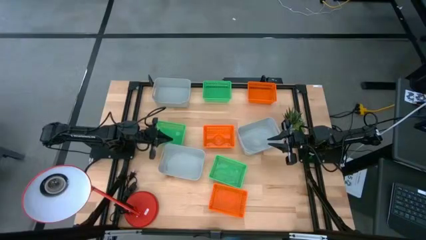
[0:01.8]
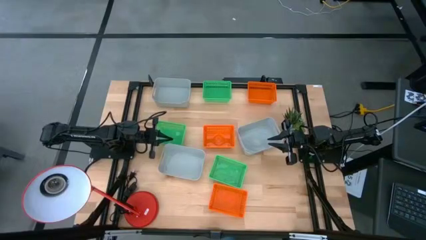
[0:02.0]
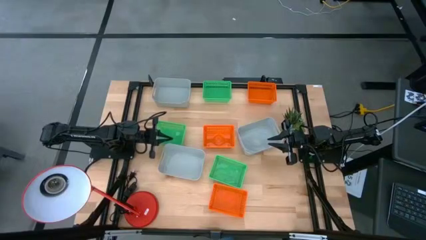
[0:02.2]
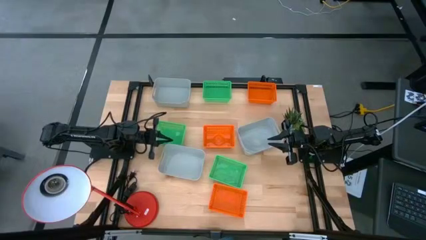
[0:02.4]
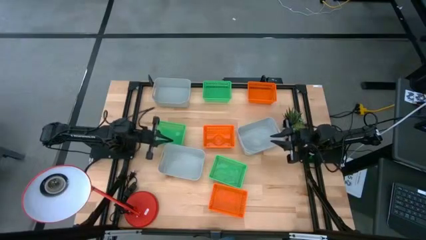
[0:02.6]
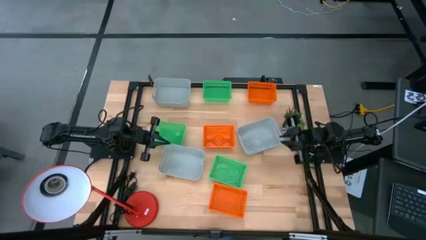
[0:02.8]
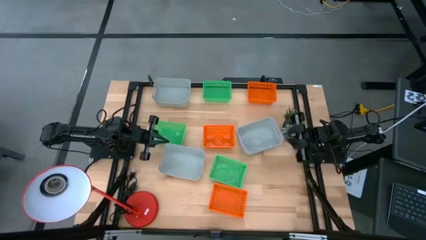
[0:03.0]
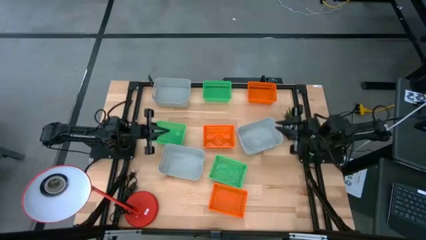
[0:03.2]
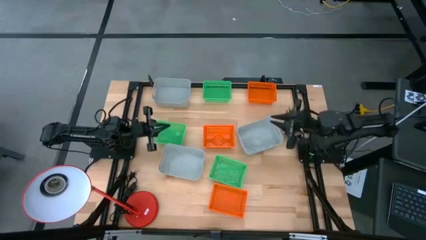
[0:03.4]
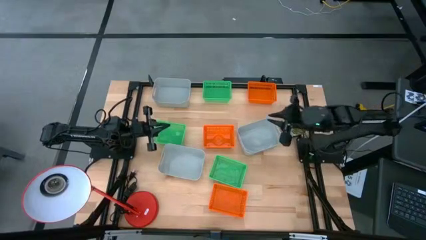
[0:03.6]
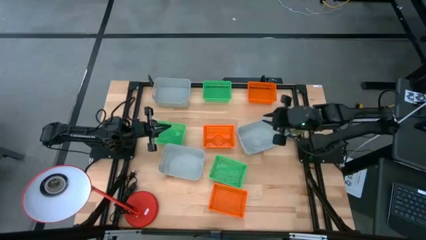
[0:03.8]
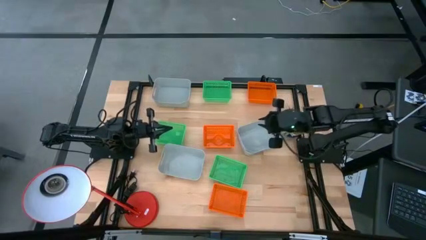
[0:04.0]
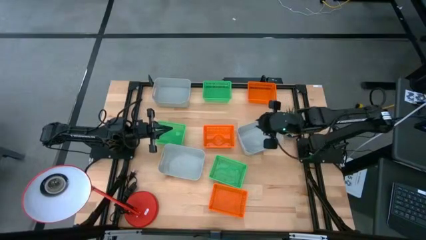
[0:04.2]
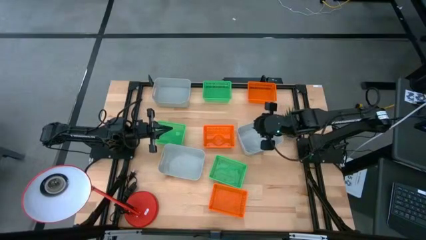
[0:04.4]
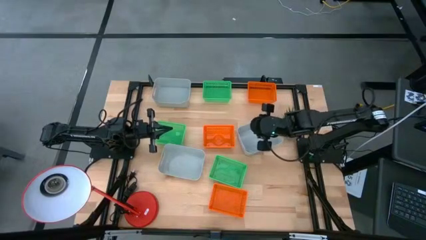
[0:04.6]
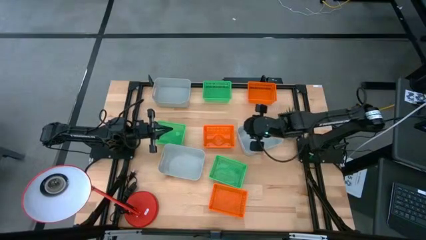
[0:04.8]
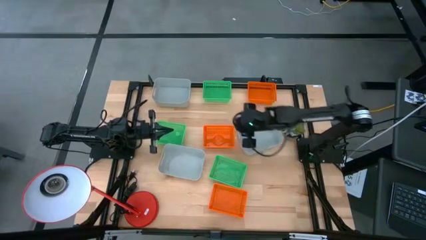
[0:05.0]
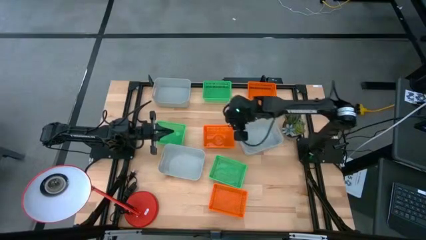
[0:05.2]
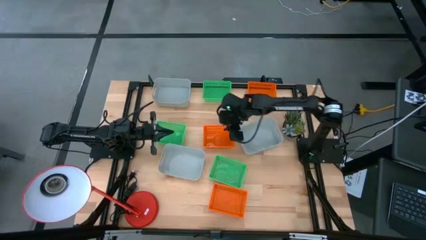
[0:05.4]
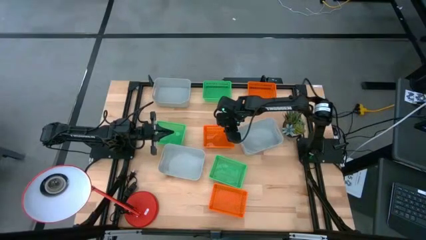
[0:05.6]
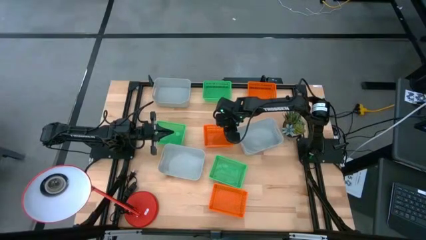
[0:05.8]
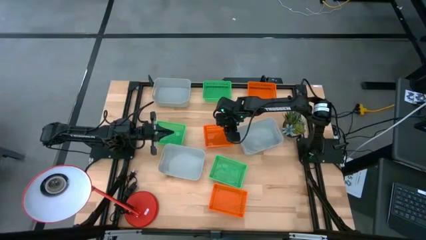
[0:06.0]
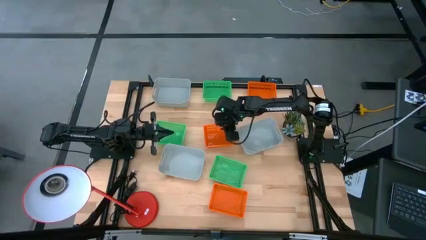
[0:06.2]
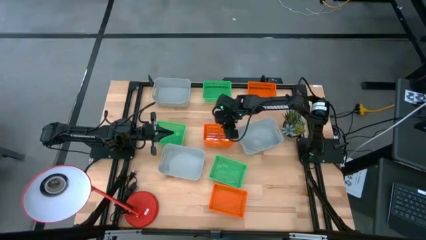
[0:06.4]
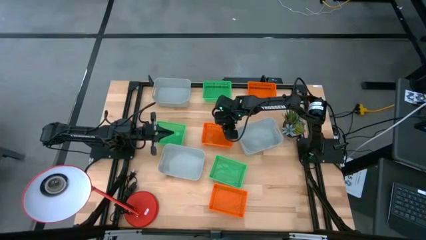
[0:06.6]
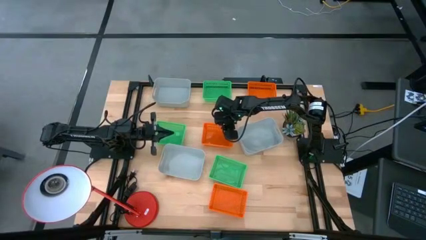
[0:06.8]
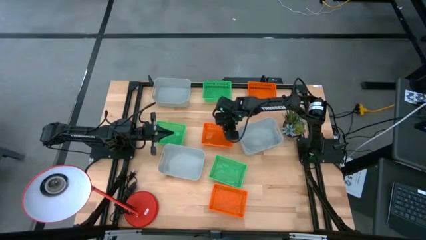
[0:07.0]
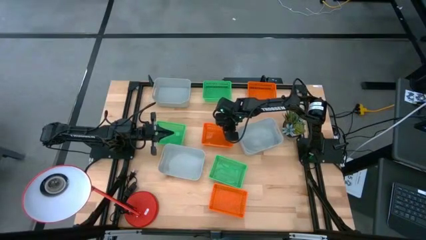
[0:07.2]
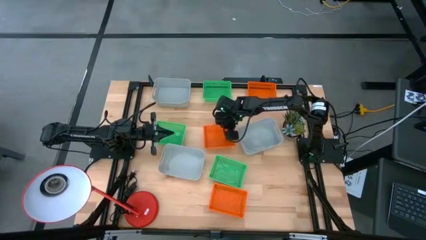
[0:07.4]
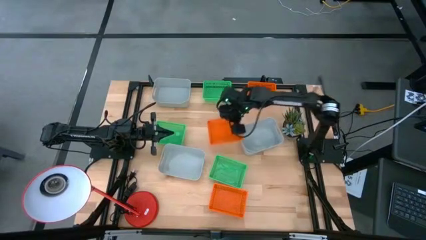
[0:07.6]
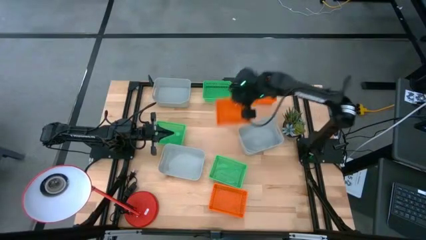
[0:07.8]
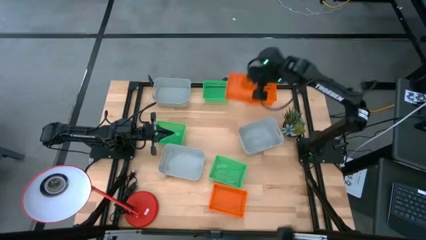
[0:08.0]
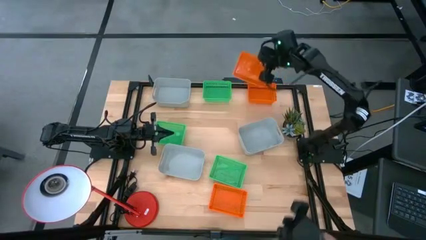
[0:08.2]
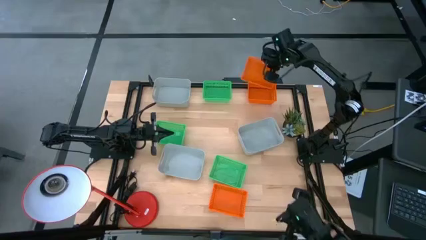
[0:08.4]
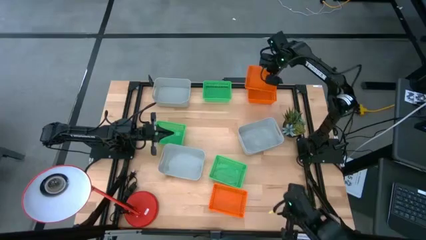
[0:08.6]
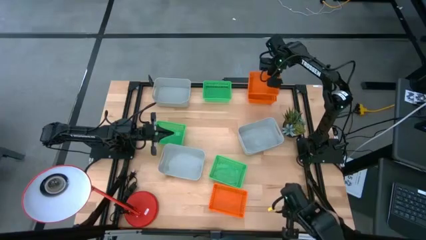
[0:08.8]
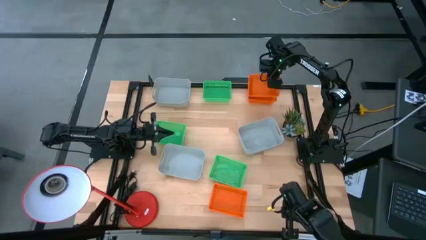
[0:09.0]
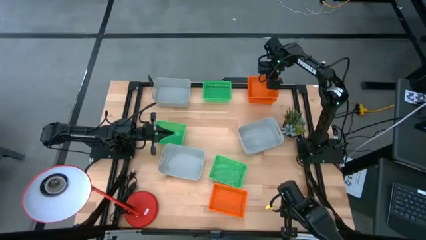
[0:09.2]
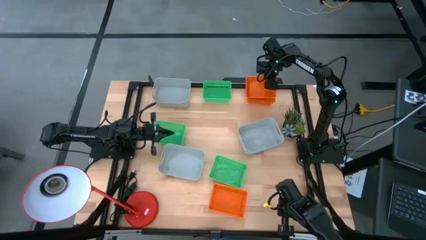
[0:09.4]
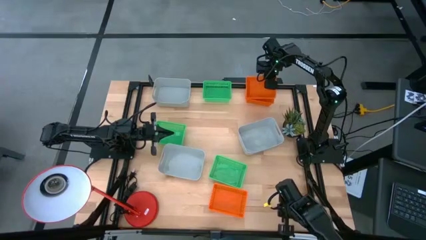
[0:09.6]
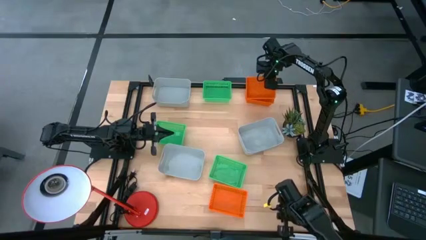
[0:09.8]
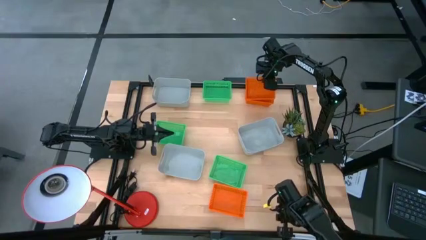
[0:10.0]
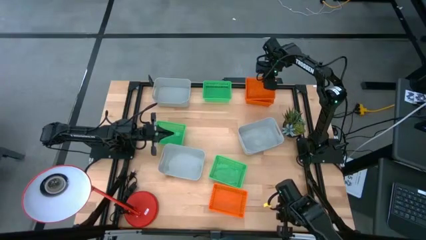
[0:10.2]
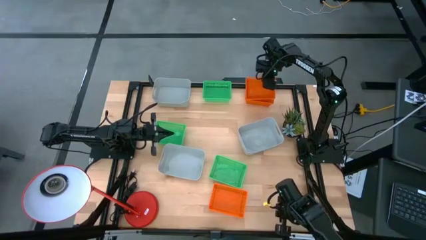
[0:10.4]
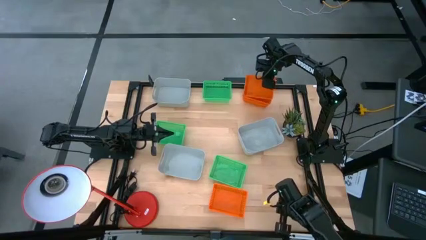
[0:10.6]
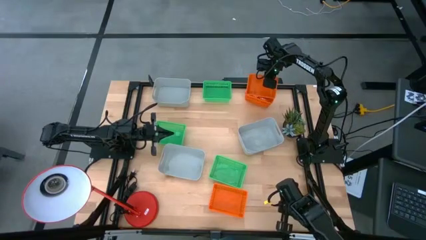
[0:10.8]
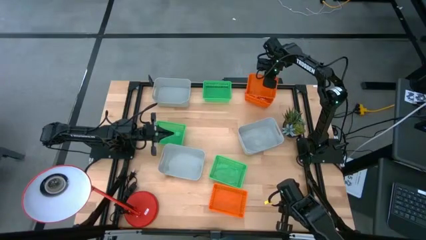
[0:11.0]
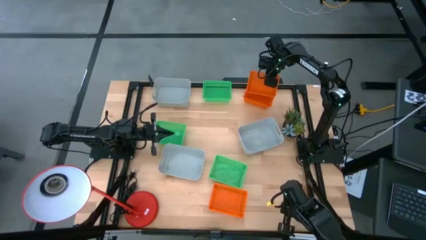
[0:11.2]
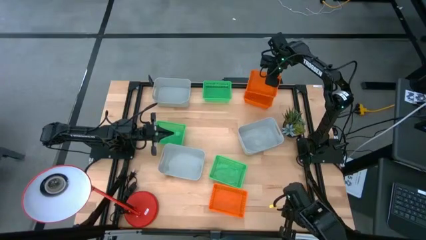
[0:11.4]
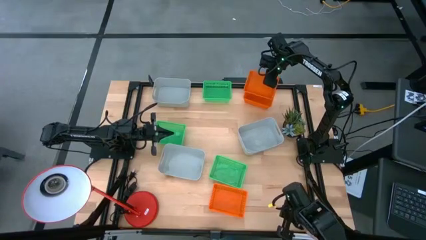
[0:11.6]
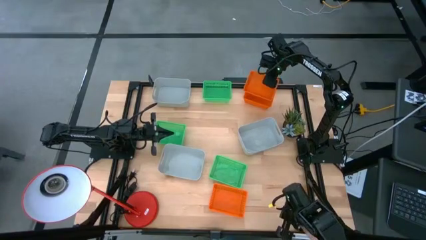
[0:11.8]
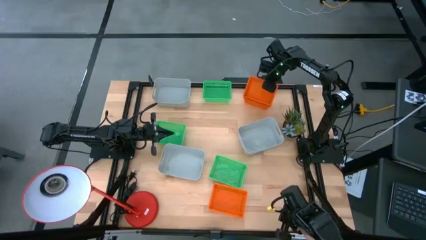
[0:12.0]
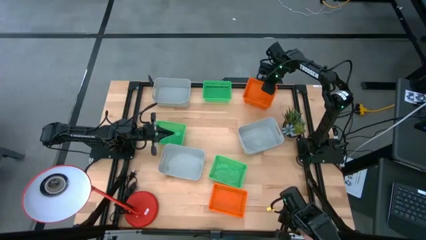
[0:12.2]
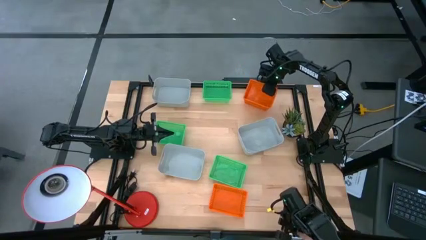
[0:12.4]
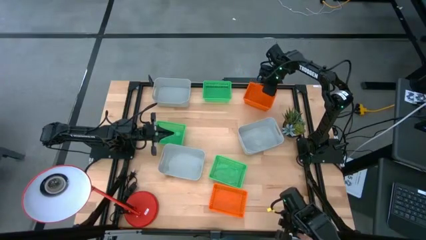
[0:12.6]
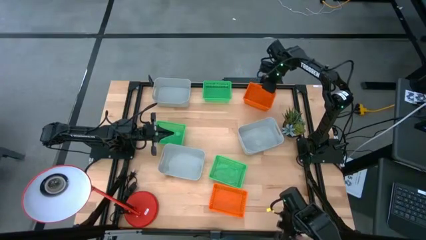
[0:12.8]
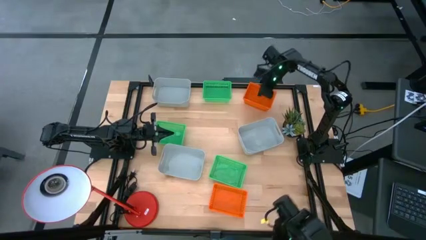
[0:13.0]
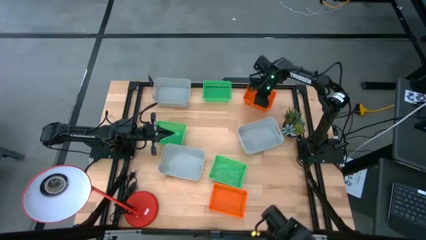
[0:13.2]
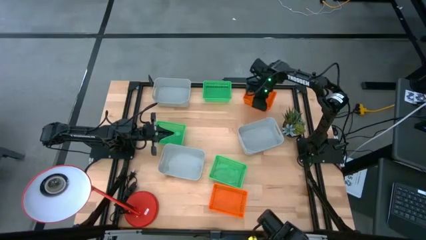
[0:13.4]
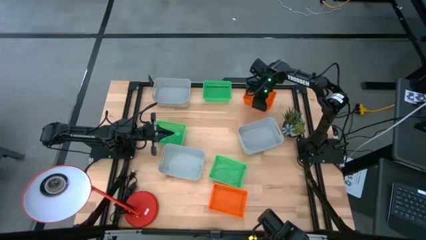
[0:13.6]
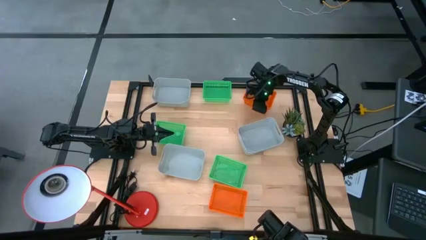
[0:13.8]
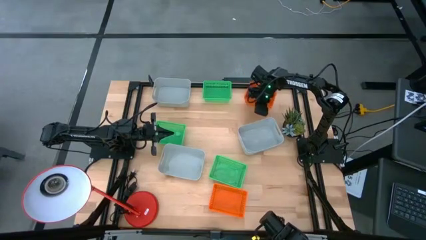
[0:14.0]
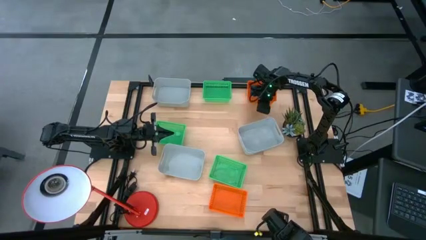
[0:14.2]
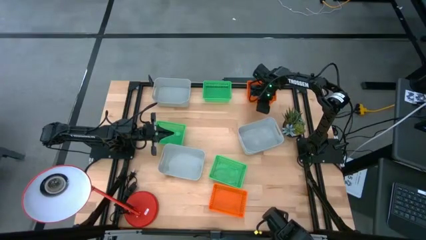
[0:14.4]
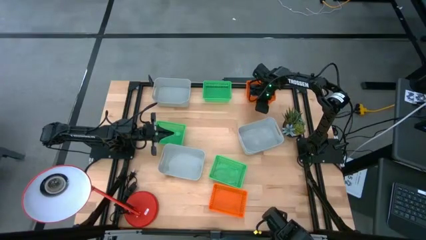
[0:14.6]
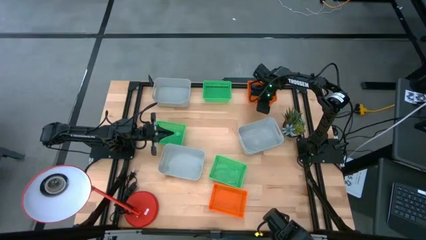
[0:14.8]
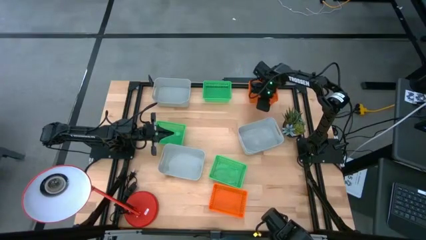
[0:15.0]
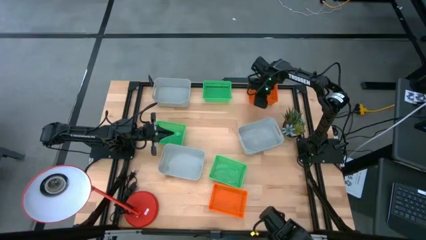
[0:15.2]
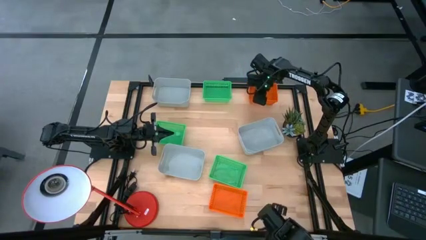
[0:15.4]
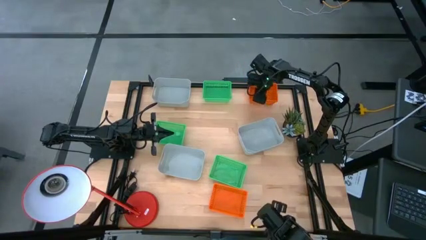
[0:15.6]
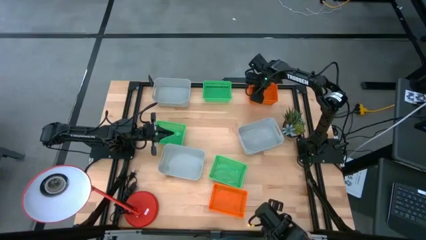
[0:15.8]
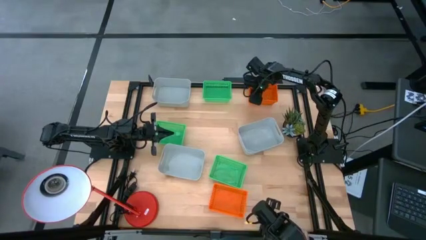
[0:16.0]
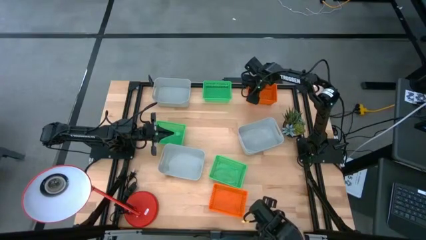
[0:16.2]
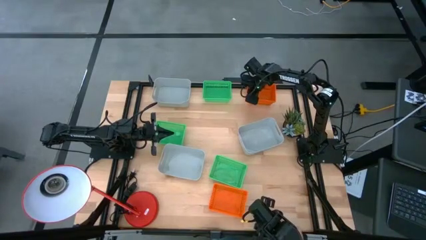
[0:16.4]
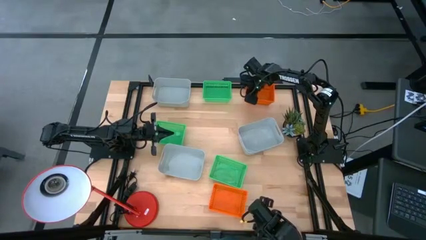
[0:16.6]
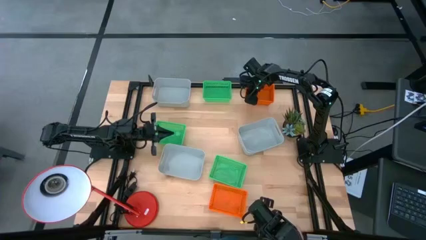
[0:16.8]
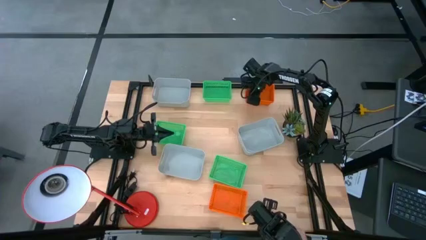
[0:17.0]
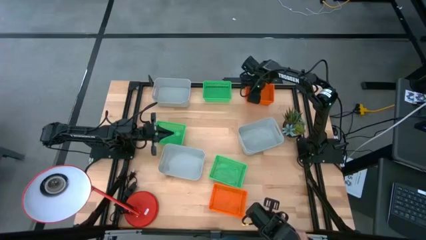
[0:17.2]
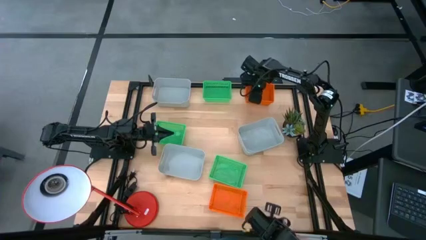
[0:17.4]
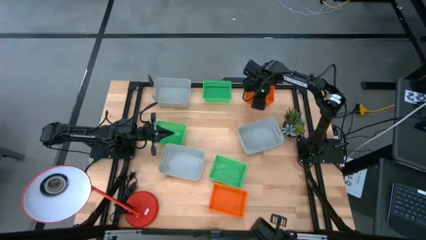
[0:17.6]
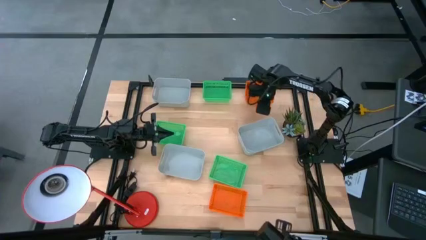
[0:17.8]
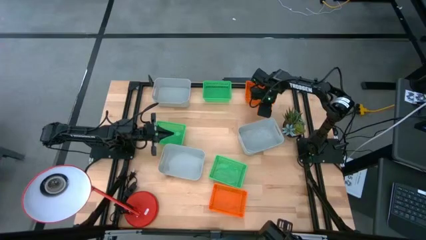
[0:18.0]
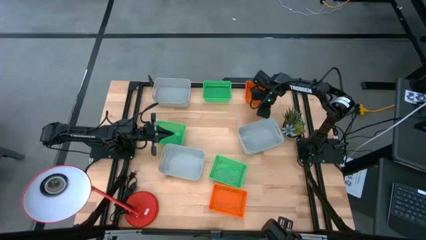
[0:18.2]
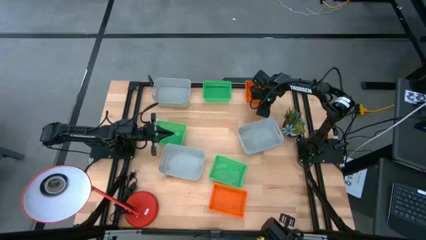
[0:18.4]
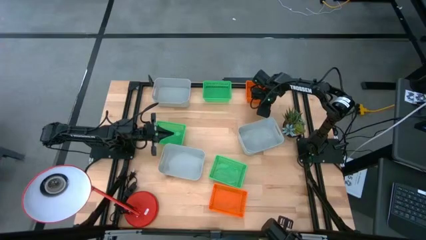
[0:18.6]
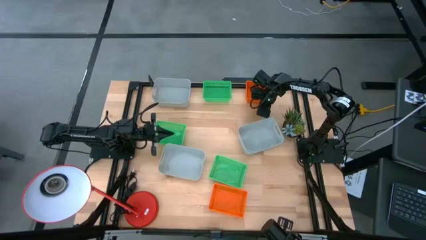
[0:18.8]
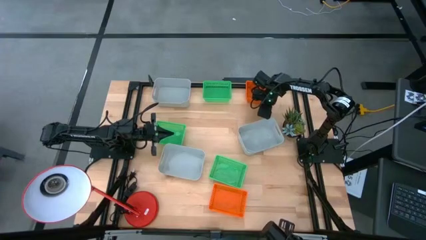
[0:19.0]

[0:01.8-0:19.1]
Stack the middle orange bin on top of the top orange bin
